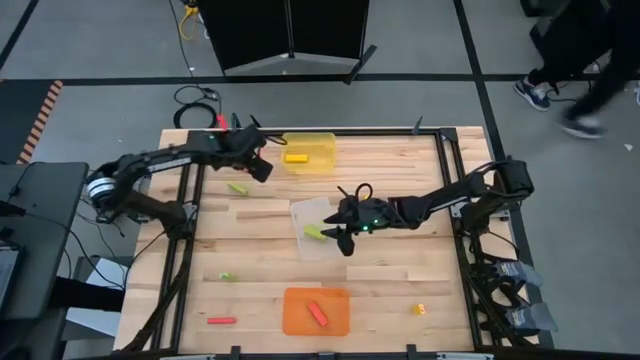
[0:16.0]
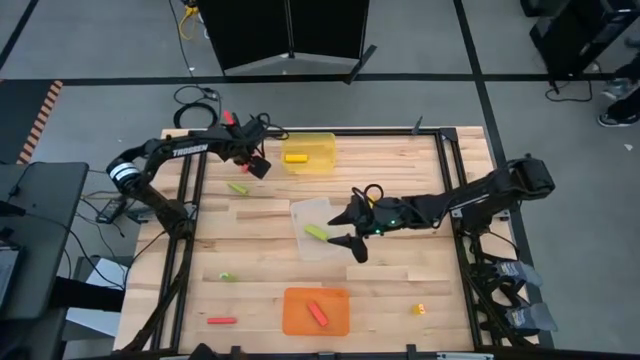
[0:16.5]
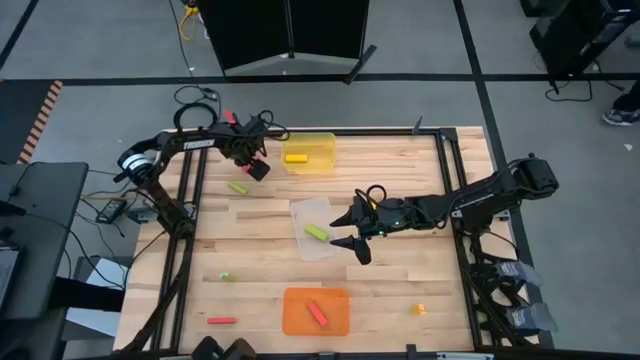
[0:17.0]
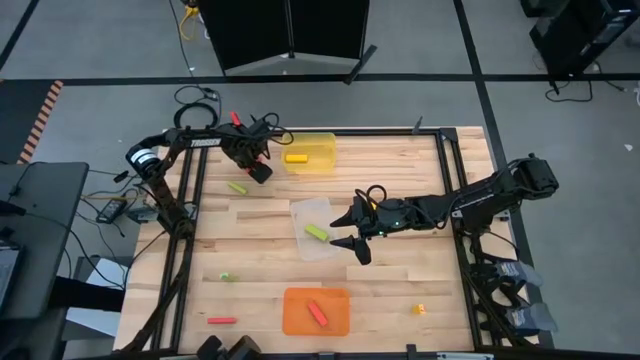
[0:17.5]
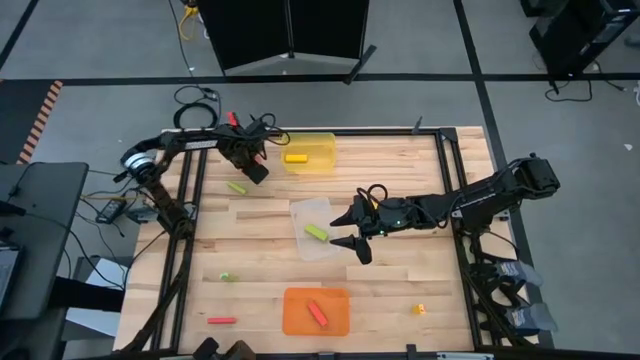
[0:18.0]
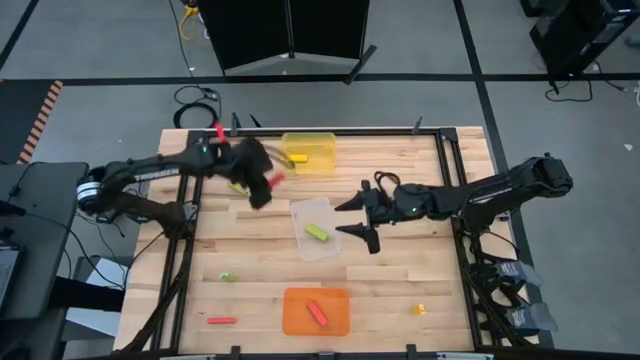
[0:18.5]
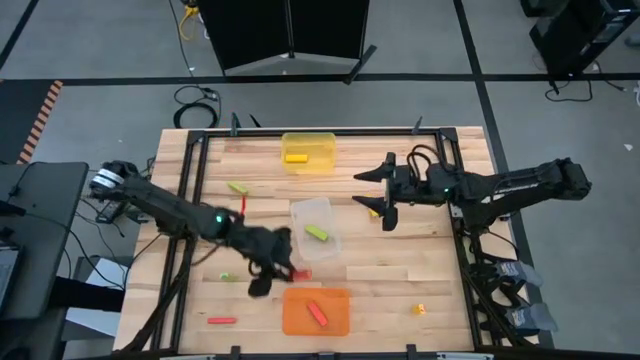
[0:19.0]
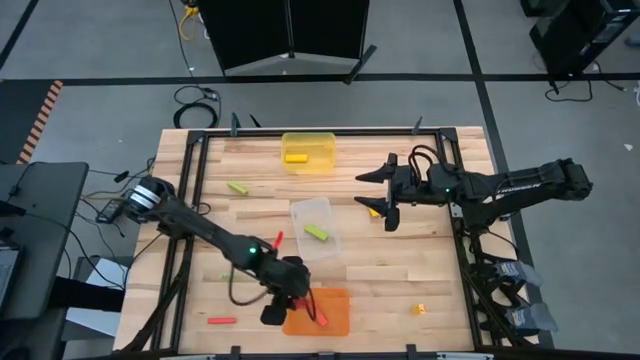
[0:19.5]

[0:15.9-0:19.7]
Task: Sort blocks
Put the top orange block into the orange bin

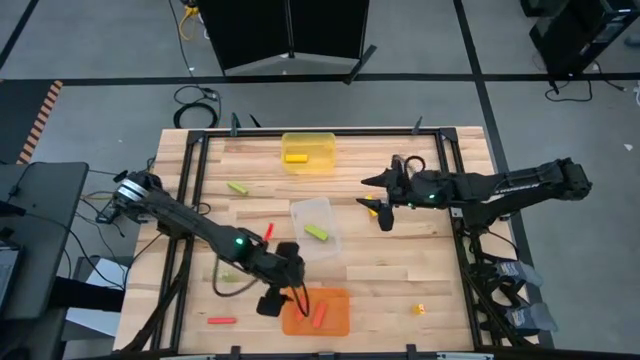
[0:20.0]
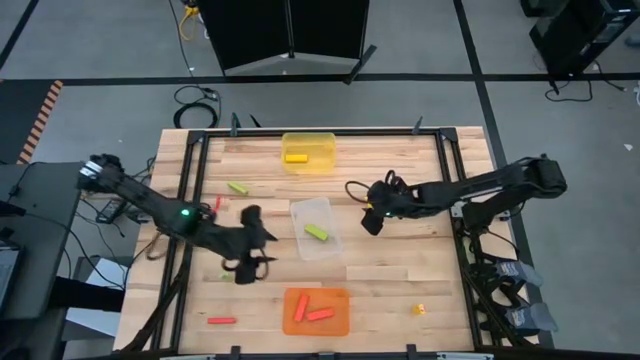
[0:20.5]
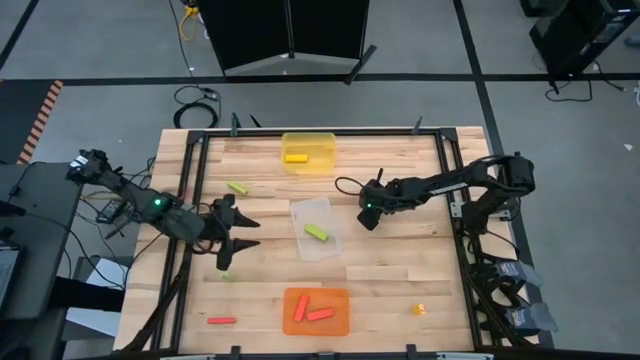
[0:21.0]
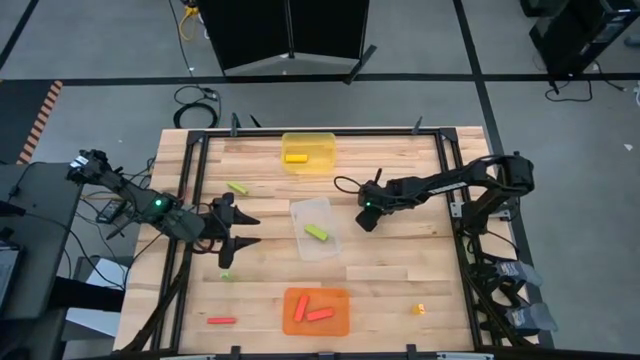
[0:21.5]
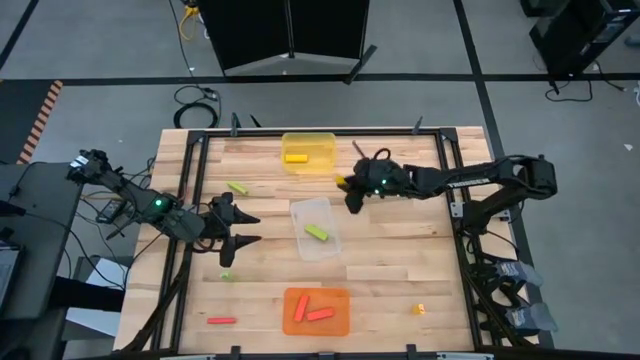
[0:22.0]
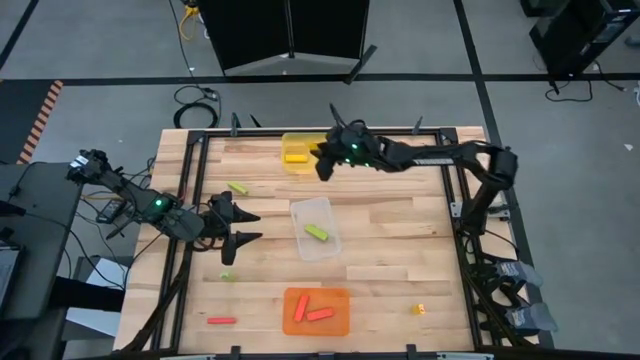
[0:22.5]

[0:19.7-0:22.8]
Put the top yellow block into the yellow bin

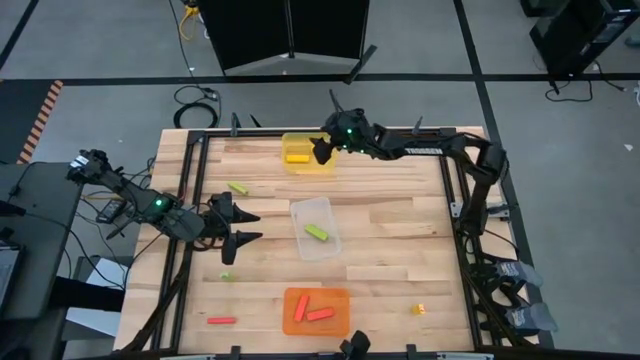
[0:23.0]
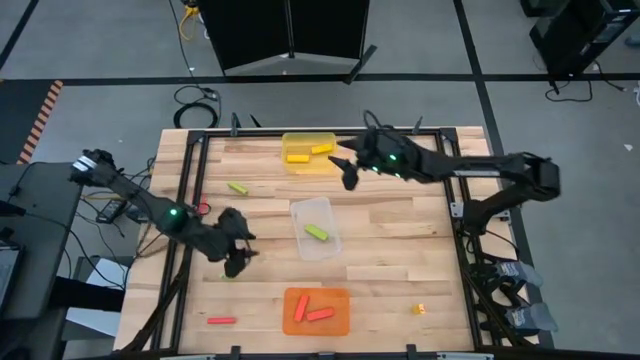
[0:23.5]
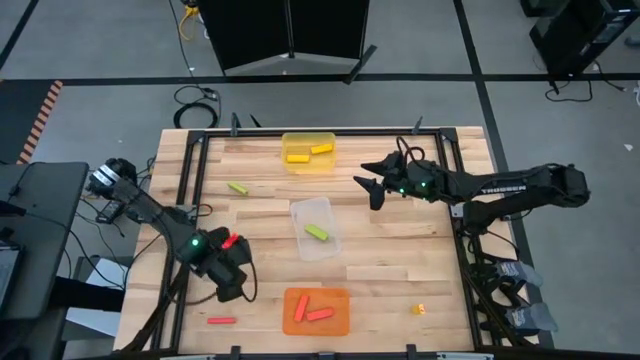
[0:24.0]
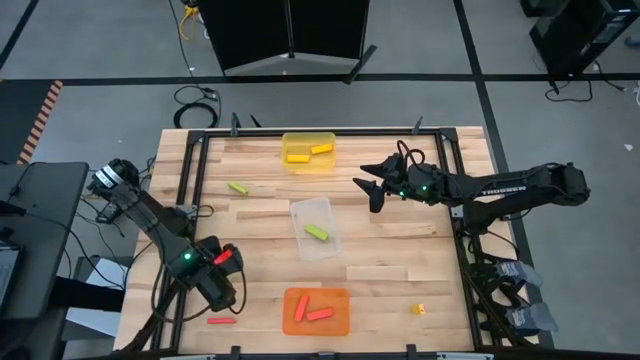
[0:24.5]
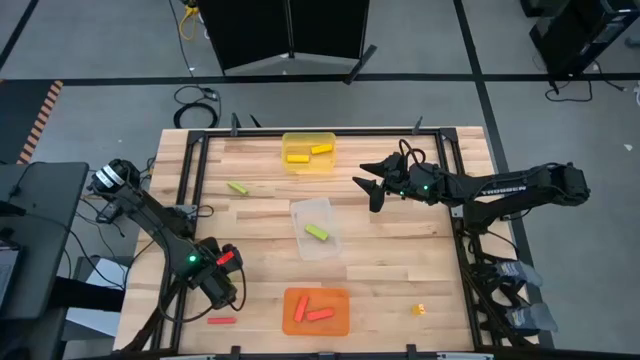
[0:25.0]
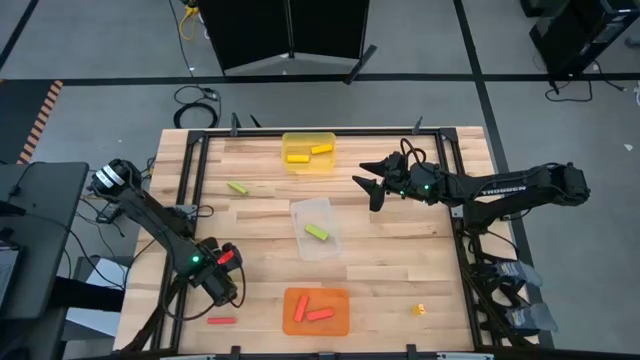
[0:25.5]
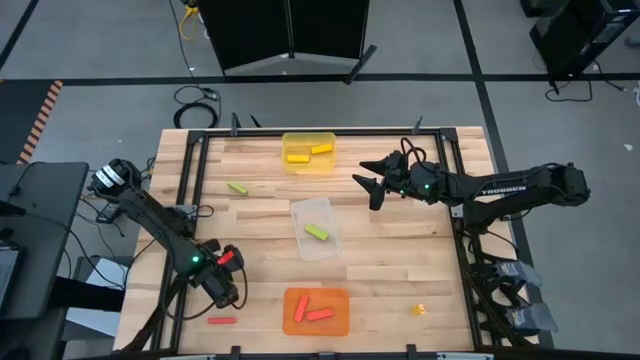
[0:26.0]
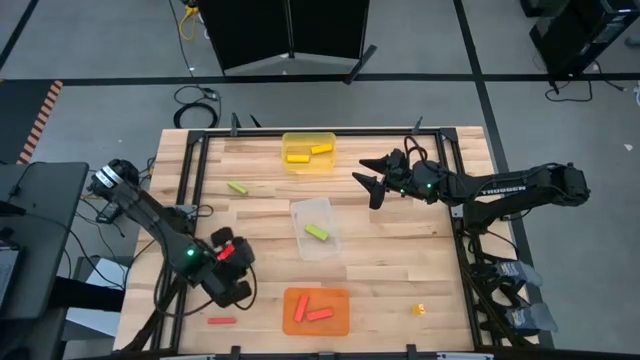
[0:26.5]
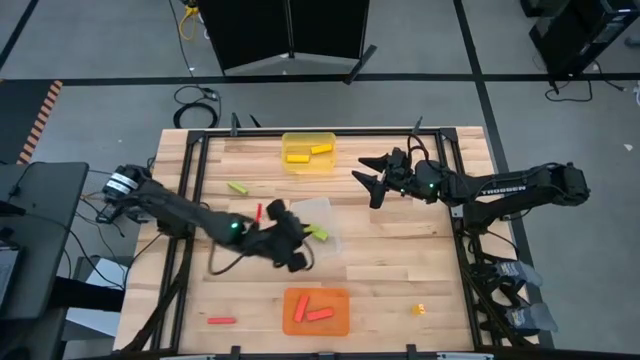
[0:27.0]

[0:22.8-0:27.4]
Put the bottom green block into the transparent bin

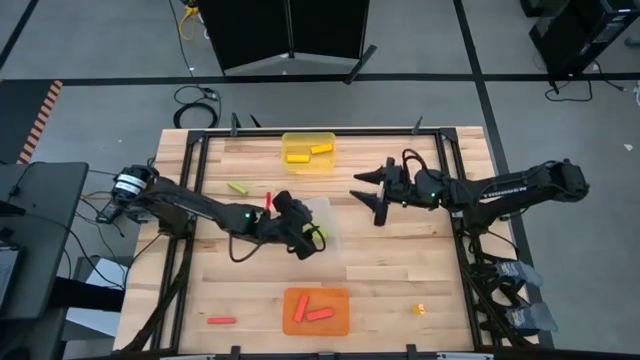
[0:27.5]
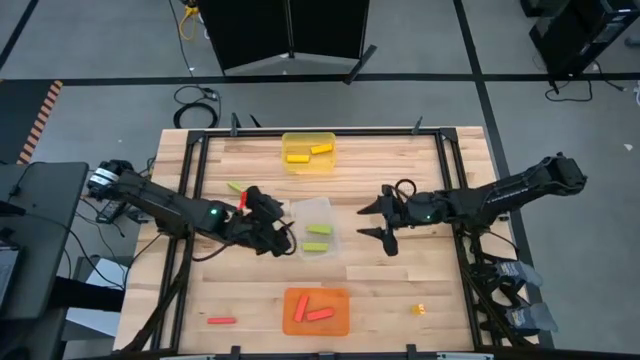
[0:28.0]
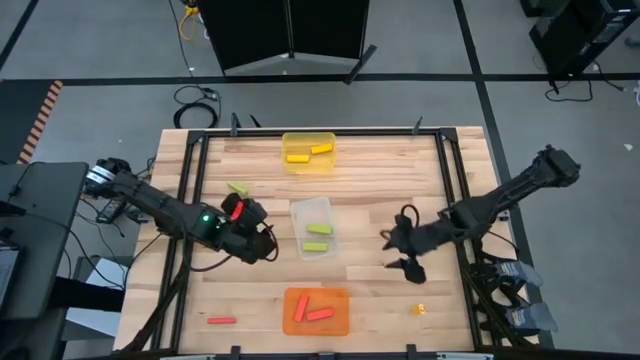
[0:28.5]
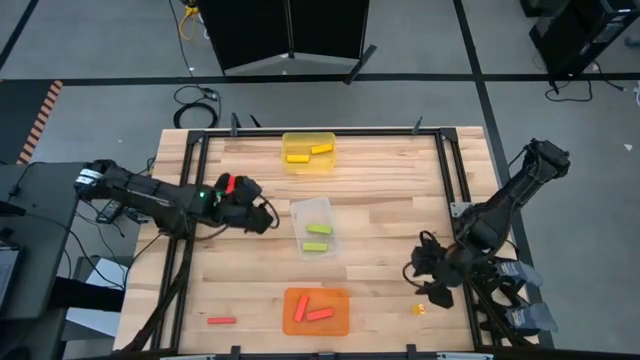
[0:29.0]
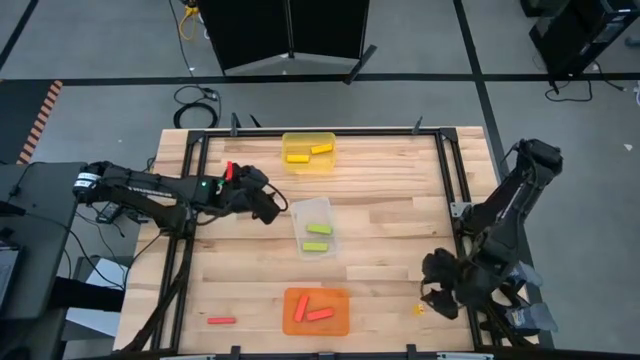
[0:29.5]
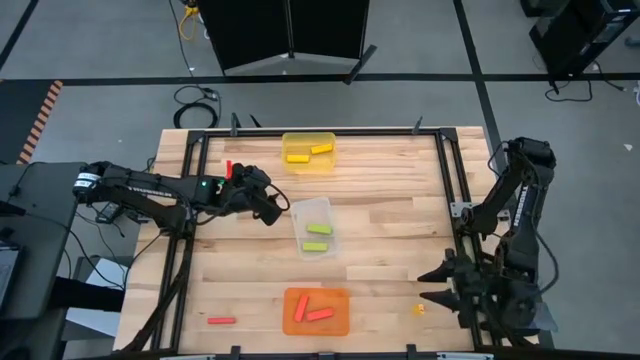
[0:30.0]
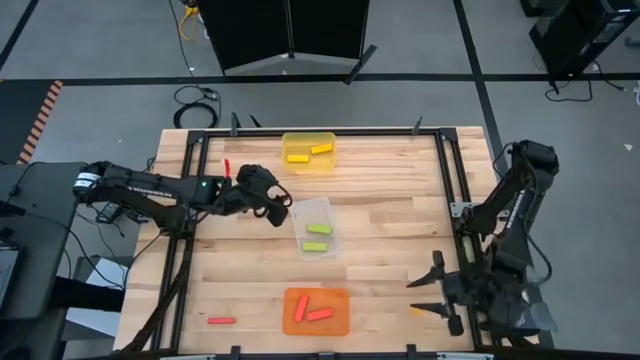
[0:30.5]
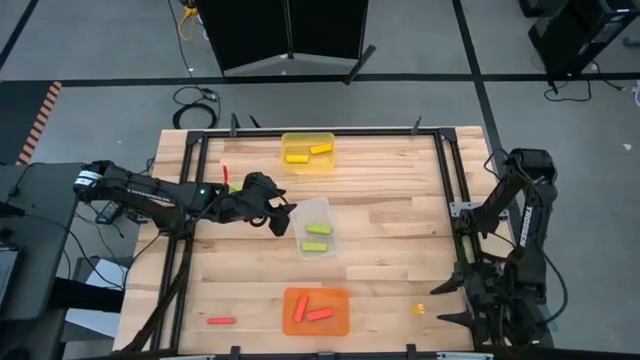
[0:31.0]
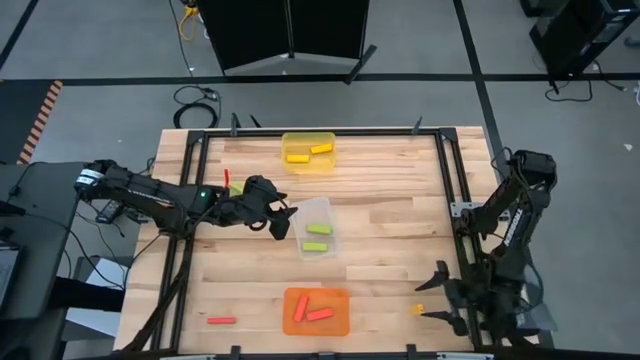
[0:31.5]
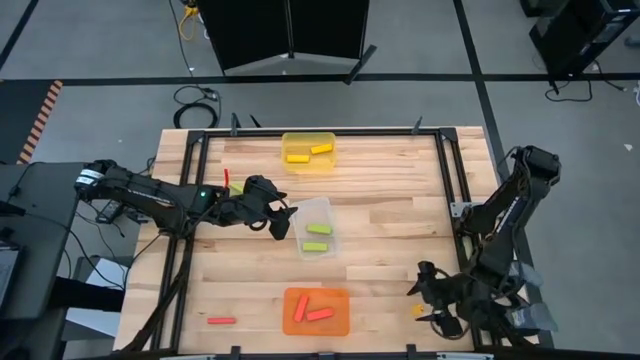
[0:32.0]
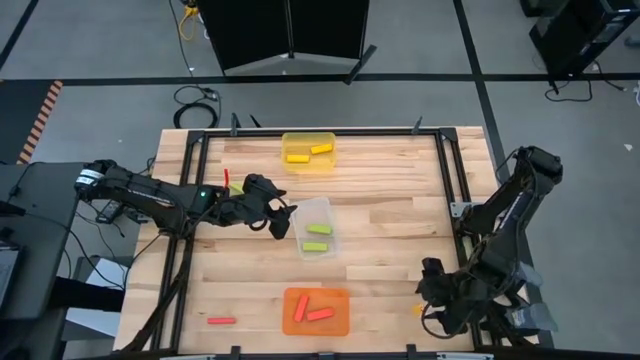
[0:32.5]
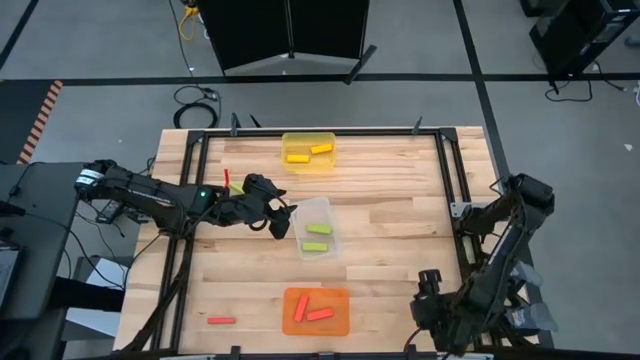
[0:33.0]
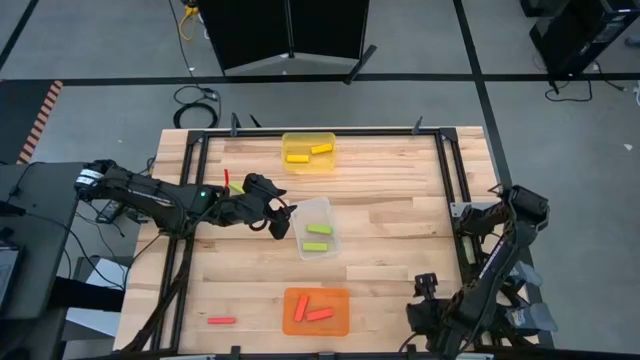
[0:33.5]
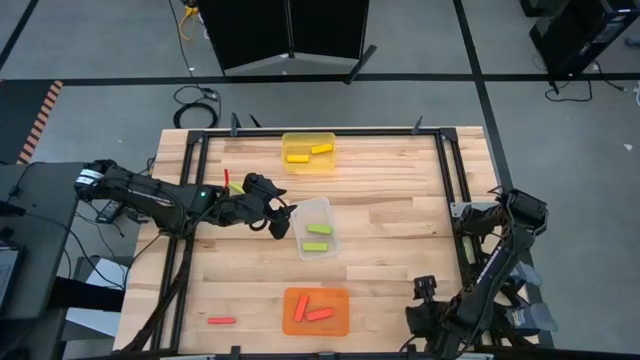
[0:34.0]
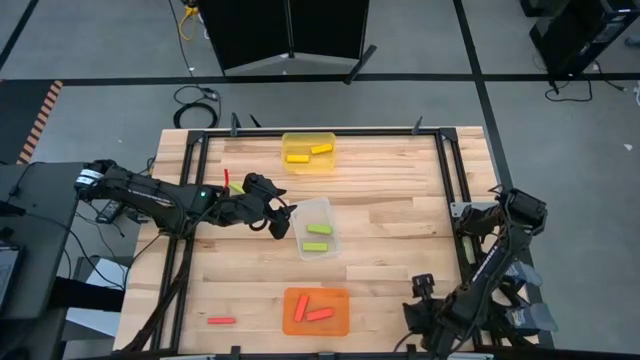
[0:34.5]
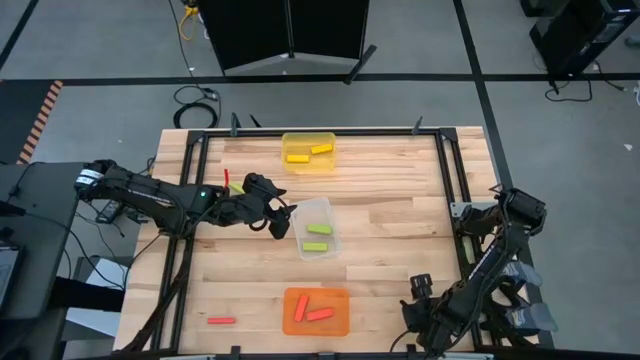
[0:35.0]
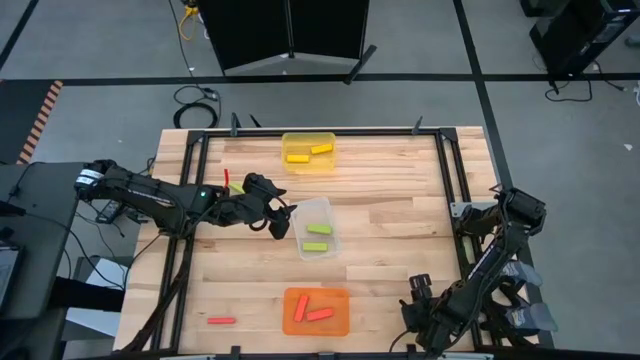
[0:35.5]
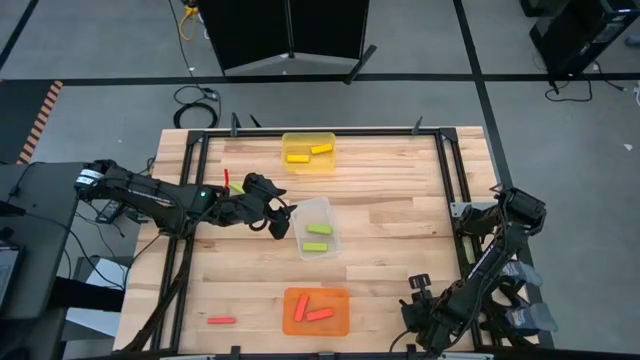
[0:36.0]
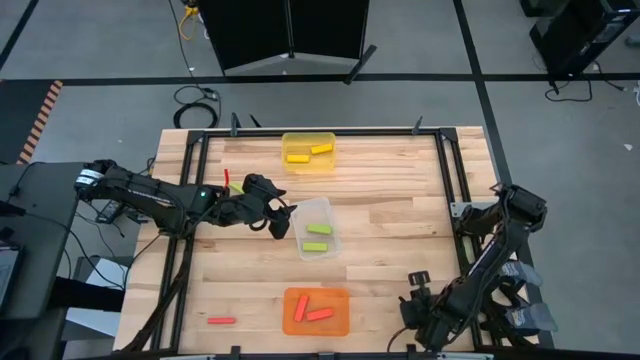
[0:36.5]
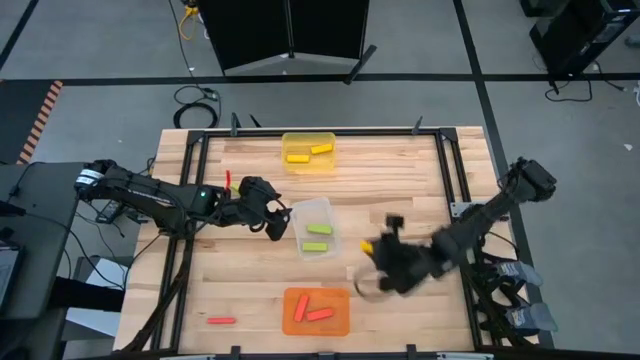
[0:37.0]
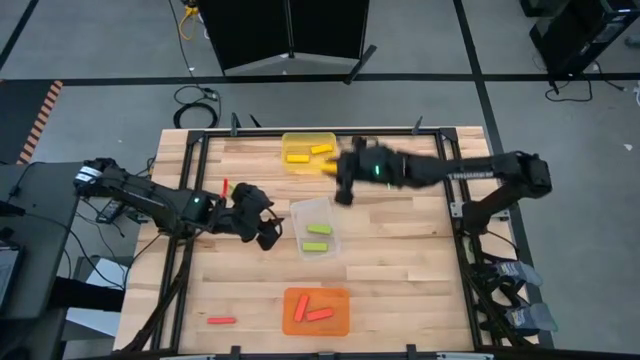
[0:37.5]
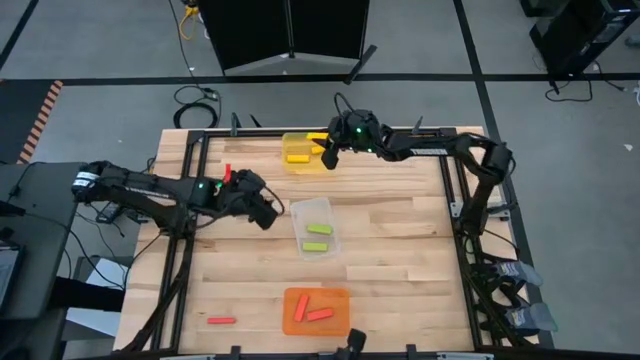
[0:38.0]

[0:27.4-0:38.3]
Put the yellow block into the yellow bin
